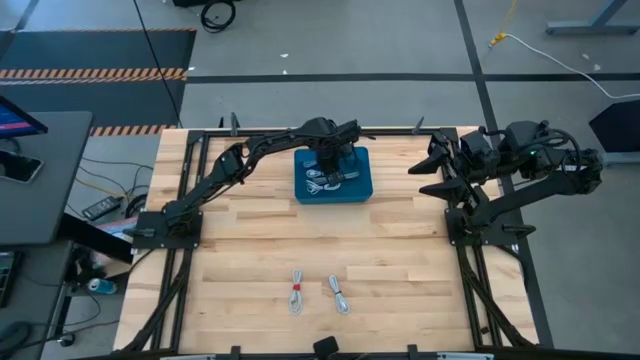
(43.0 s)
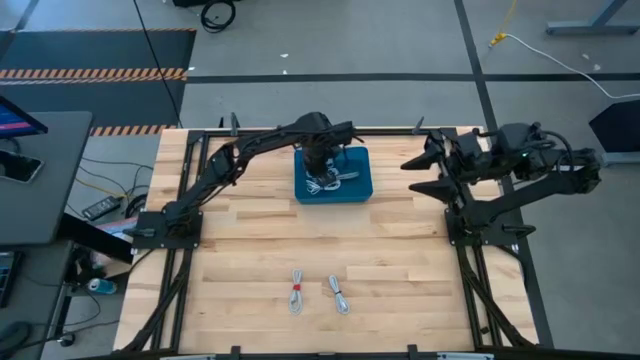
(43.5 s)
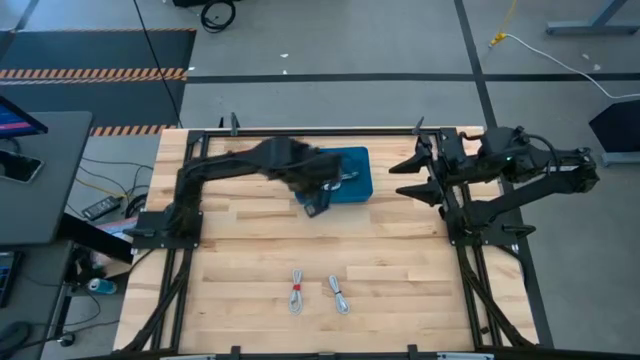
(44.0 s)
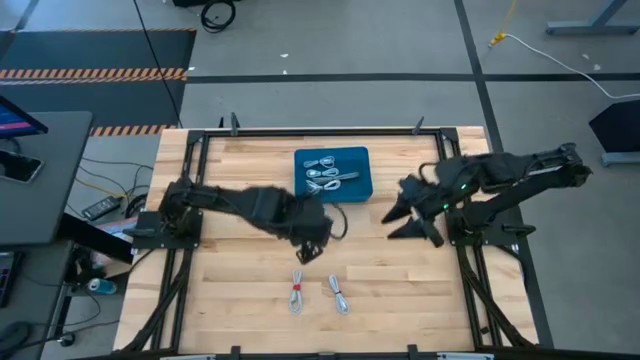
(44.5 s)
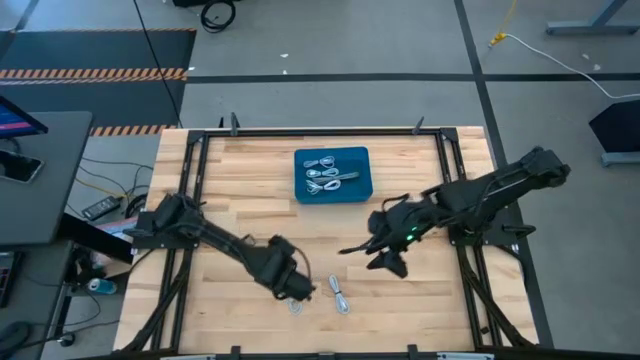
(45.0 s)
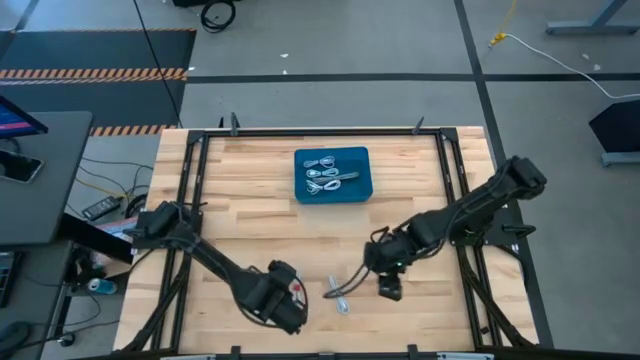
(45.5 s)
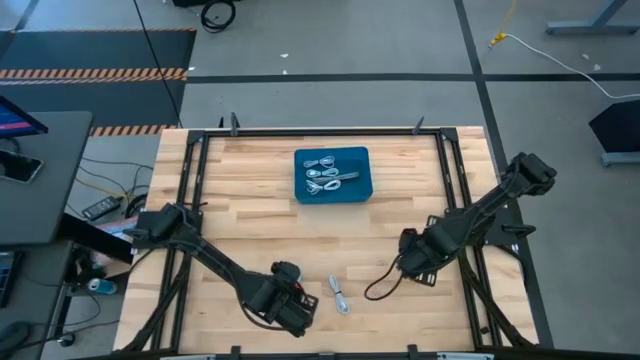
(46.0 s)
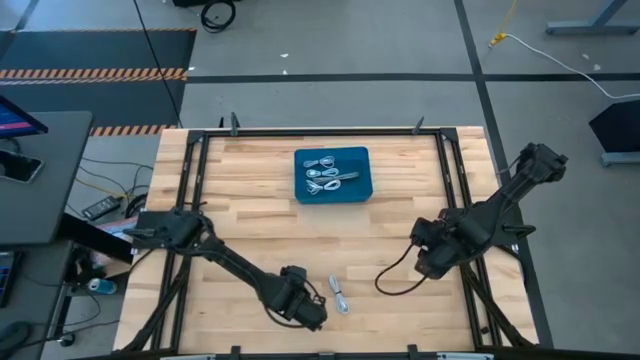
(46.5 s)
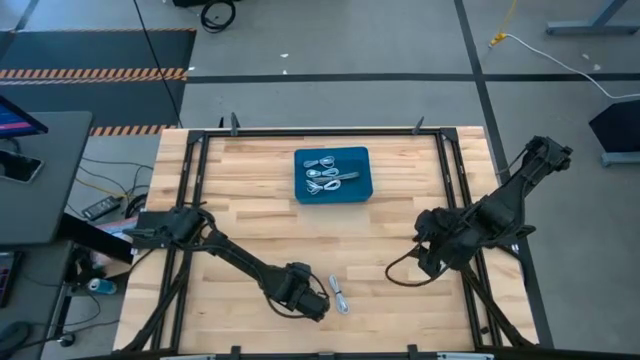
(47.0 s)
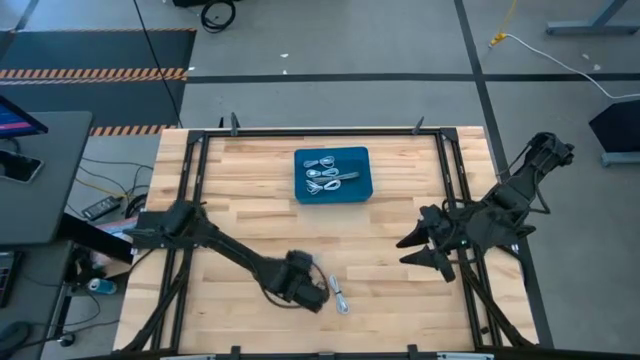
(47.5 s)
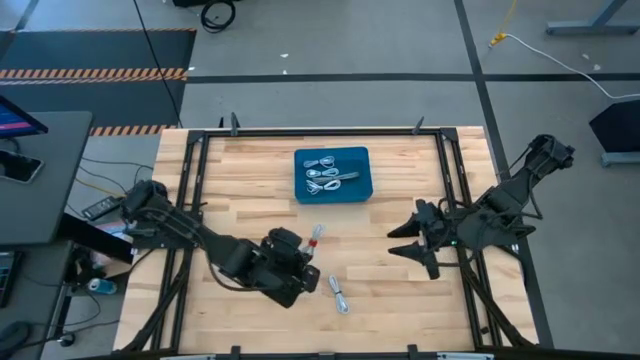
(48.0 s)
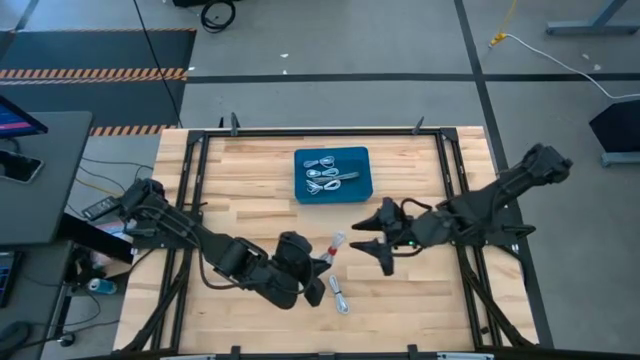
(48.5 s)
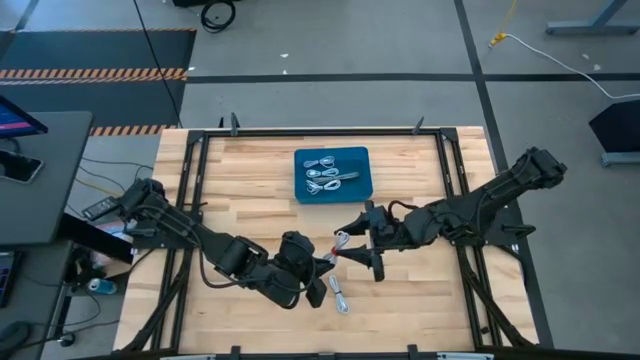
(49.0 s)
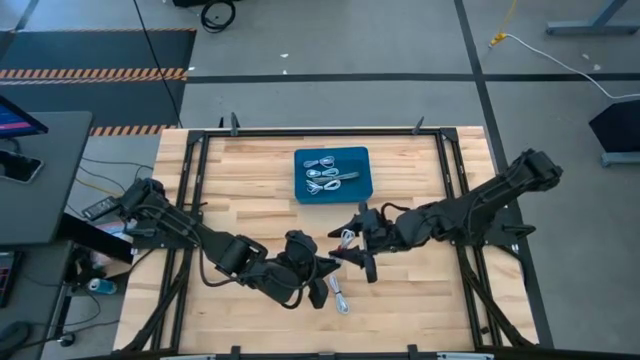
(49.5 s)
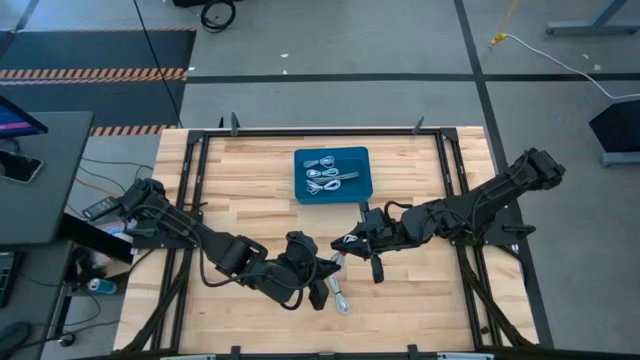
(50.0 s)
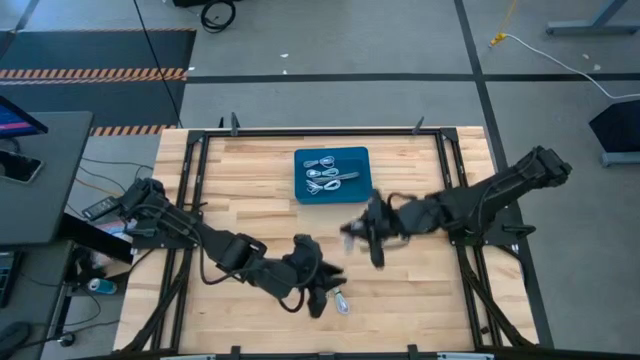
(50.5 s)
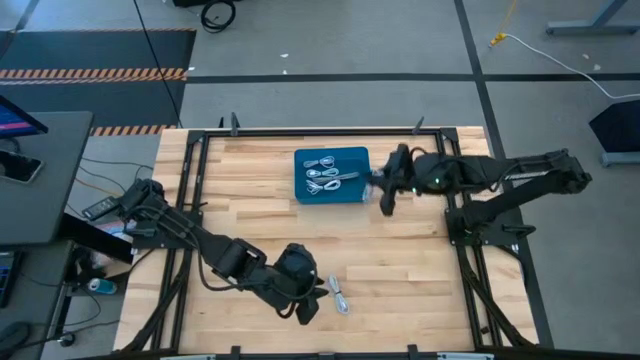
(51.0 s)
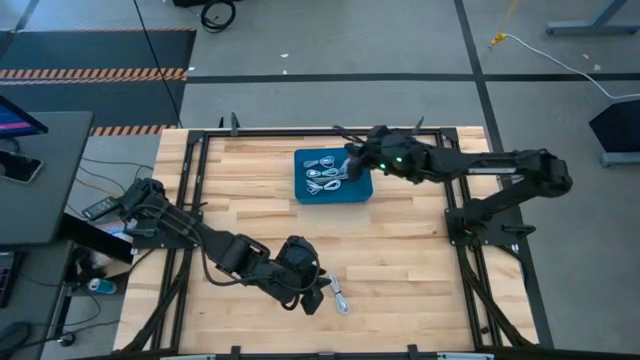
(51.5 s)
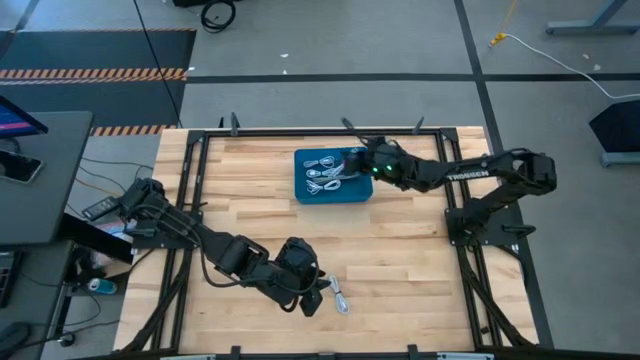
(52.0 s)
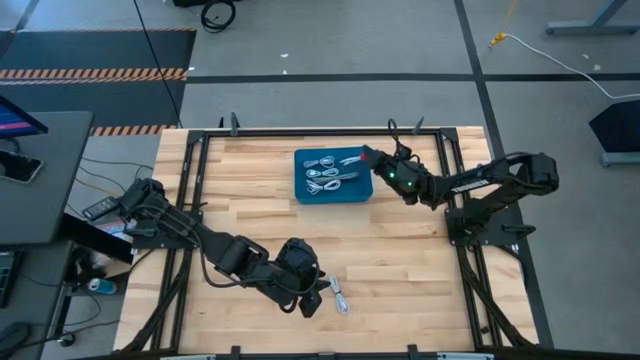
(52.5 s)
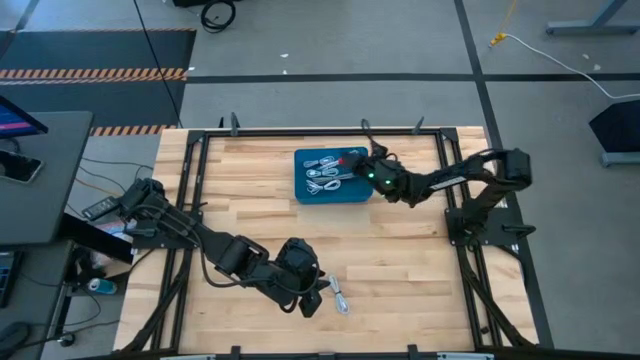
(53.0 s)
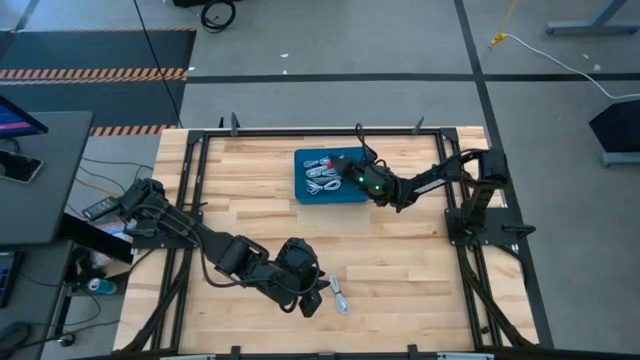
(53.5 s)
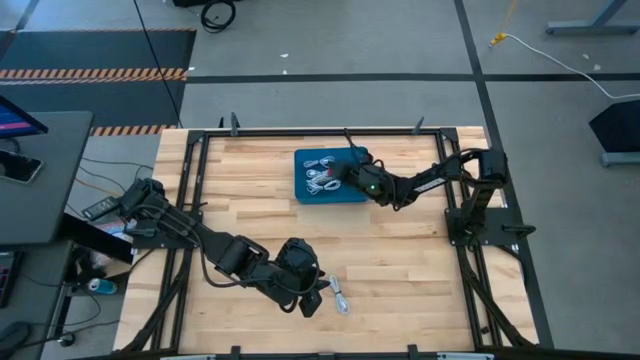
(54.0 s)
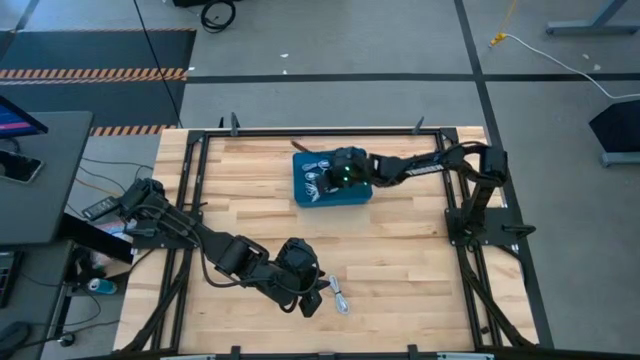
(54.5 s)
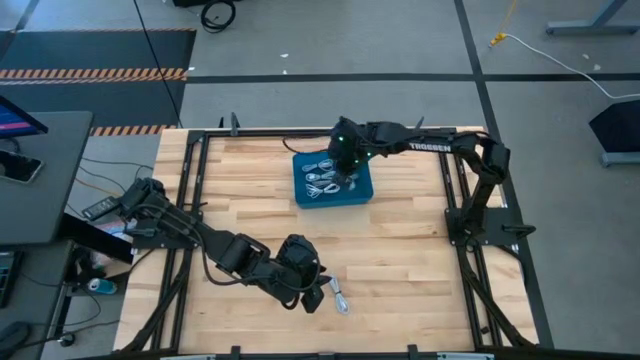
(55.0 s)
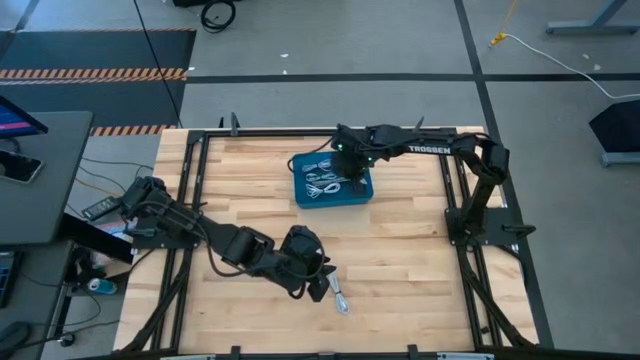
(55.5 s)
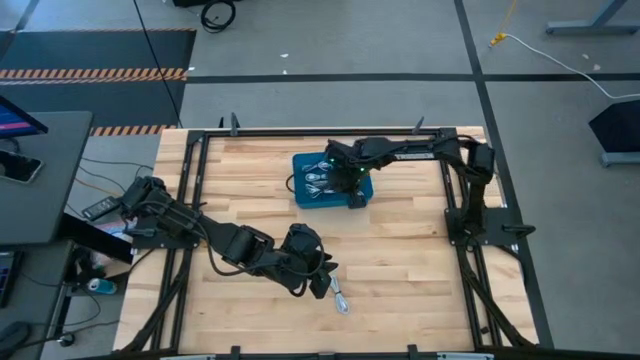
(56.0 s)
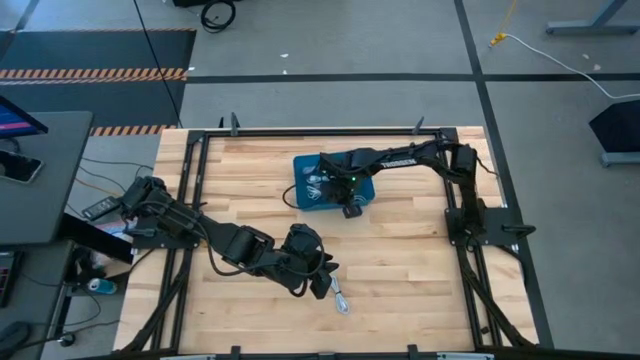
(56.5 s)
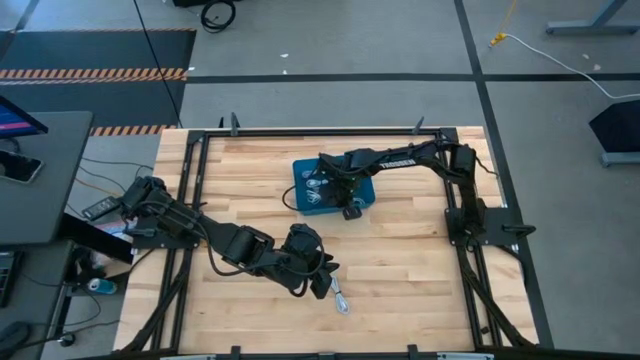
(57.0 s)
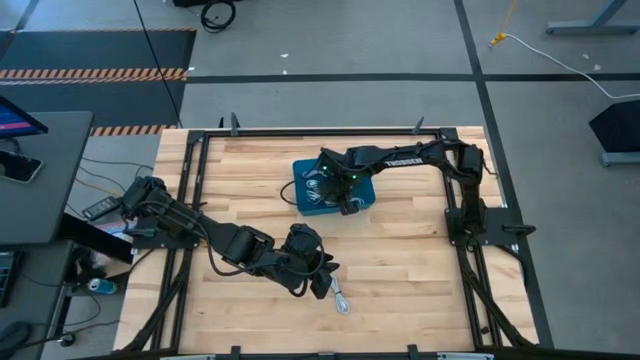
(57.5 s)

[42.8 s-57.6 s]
Task: Pick and place USB-C Cables
Put the white charger cable into the blue bin

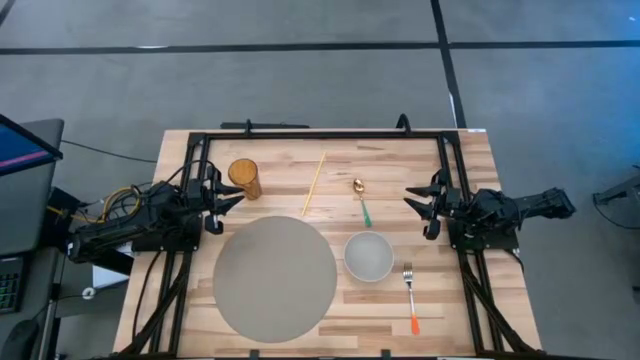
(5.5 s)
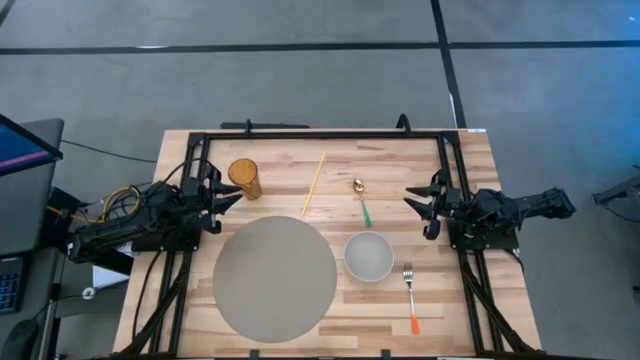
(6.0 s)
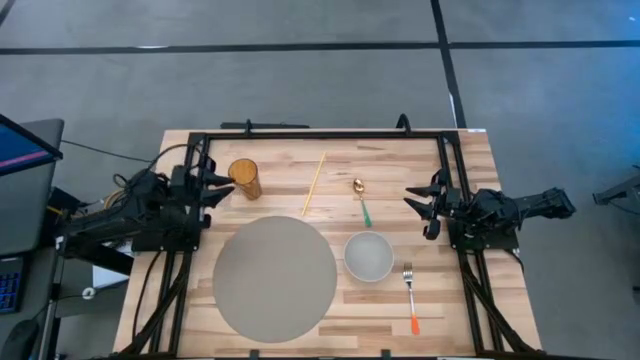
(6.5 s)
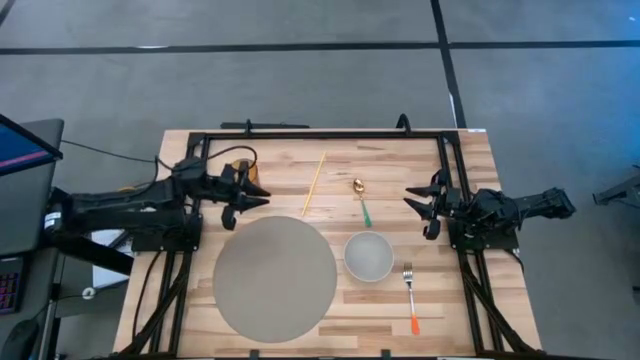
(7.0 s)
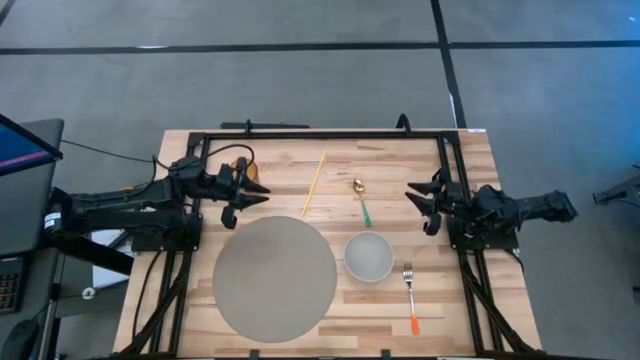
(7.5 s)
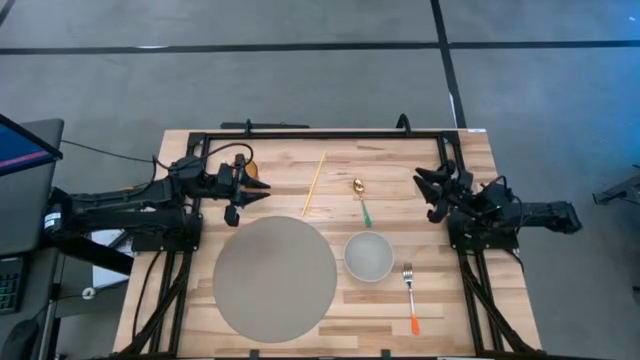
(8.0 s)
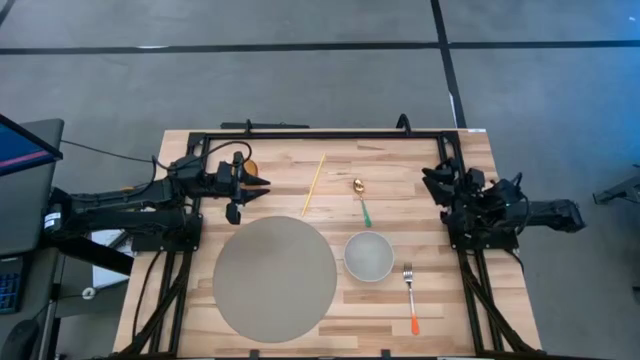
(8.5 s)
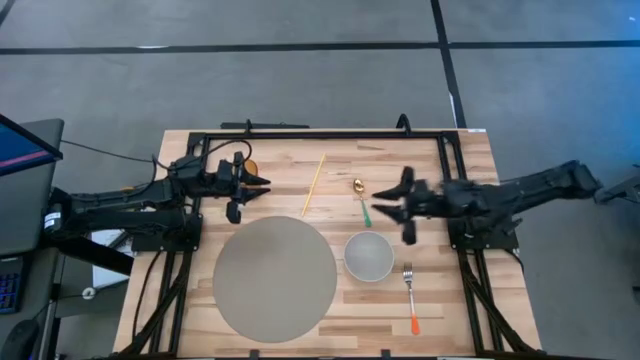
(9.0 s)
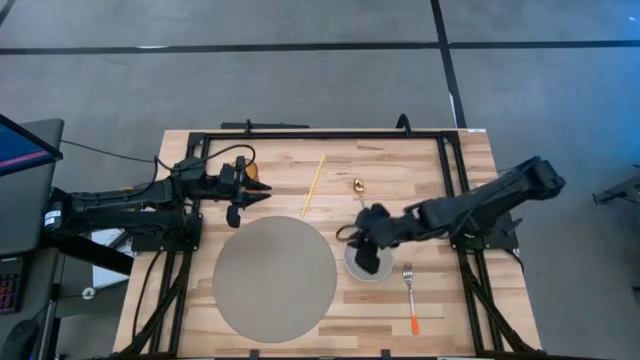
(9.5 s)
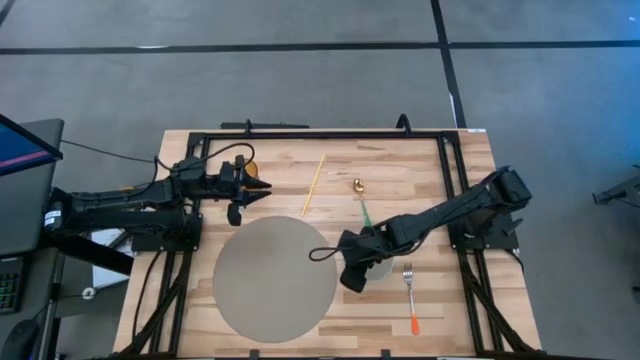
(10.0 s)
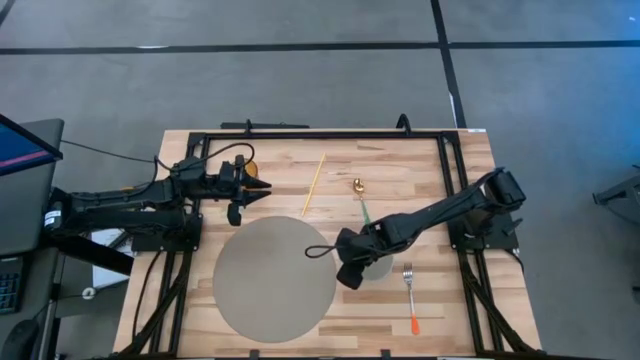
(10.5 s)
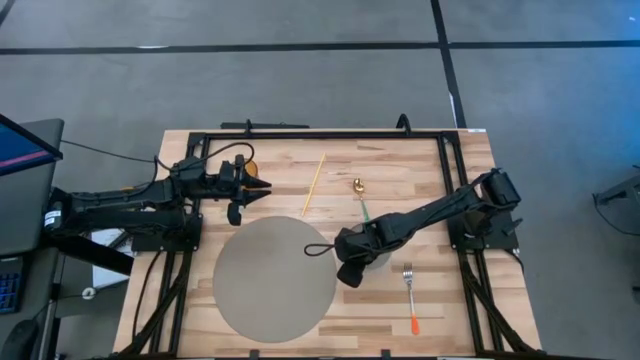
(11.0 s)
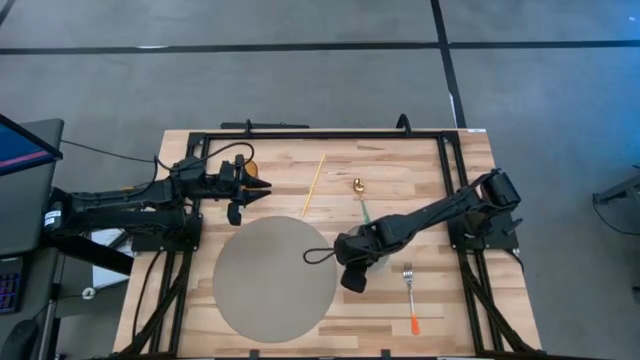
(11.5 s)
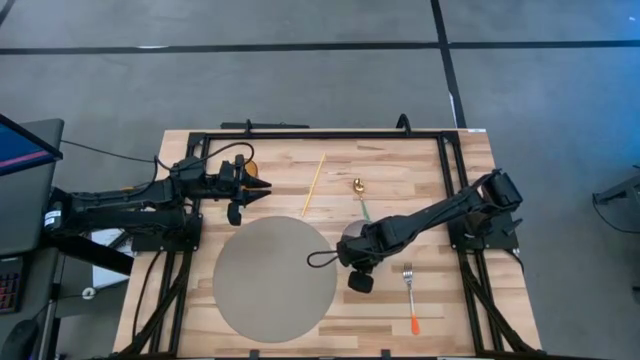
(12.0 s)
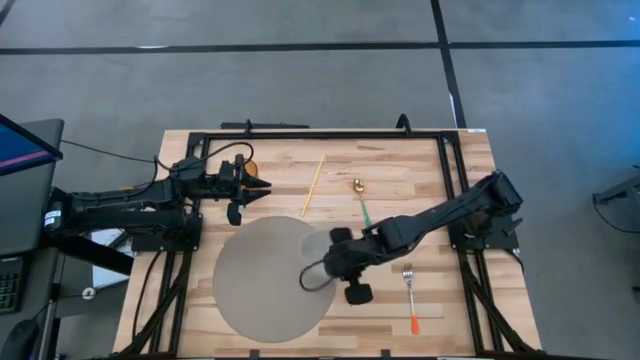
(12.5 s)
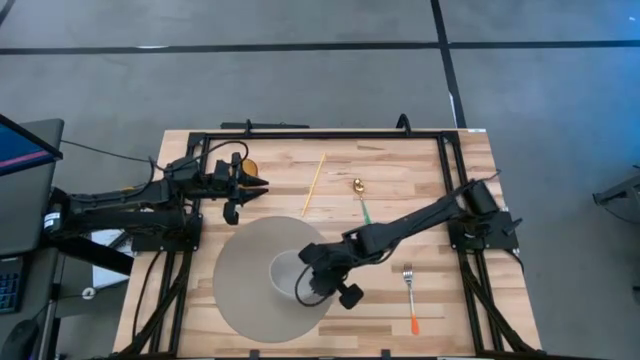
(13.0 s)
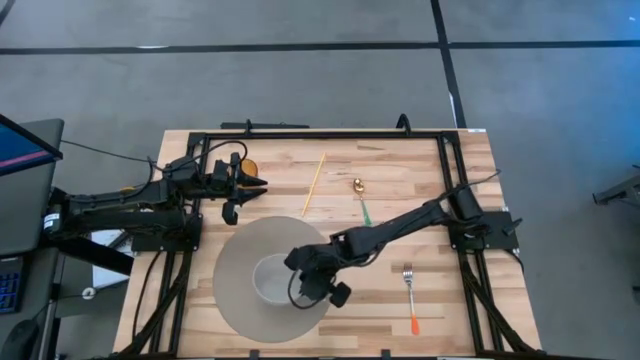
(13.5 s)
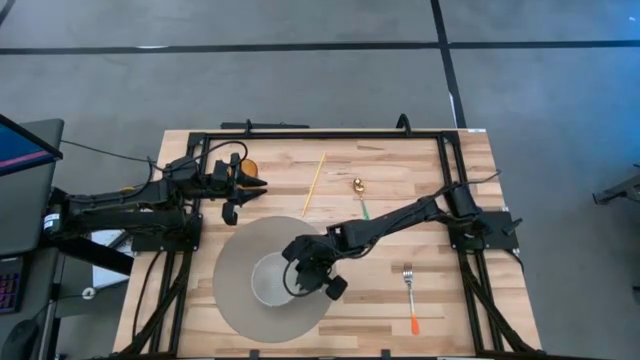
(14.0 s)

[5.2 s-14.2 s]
Task: Pick & Place Utensil
Put the gray bowl on the gray mat
